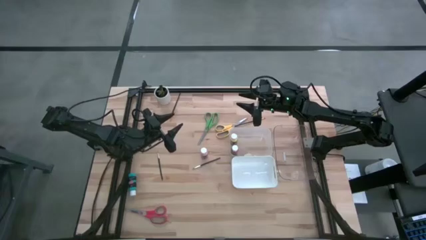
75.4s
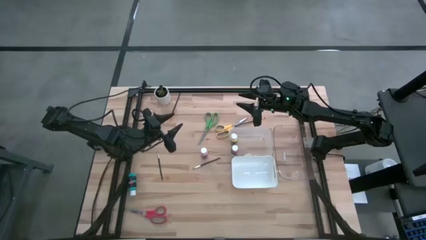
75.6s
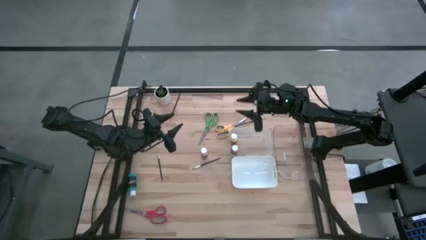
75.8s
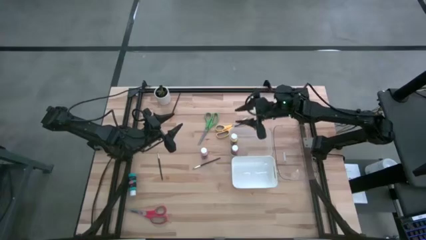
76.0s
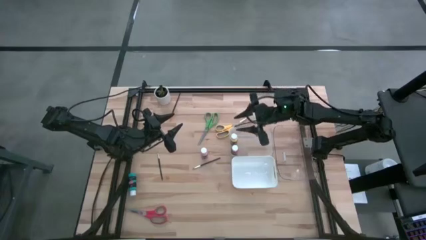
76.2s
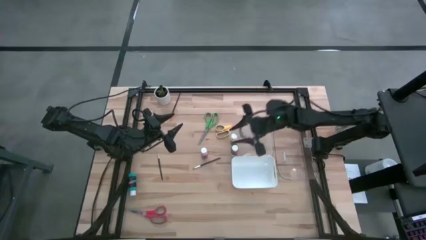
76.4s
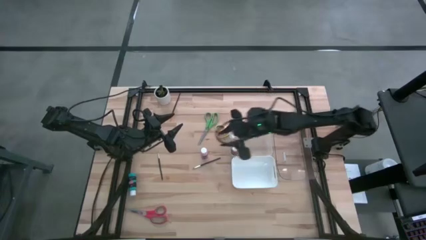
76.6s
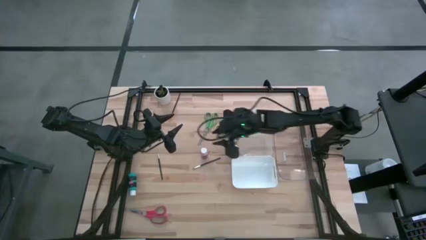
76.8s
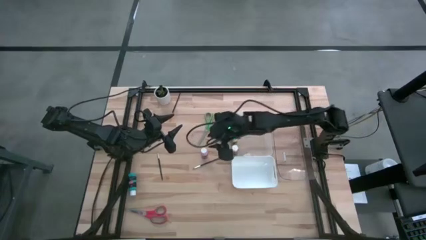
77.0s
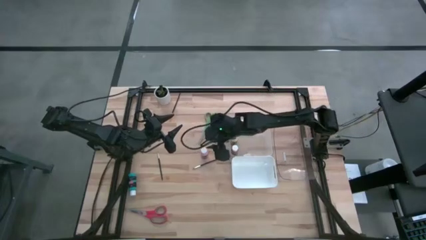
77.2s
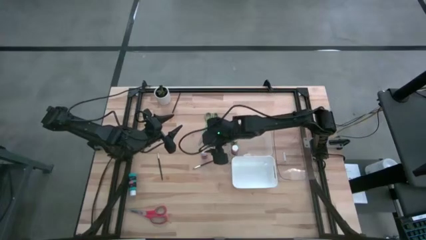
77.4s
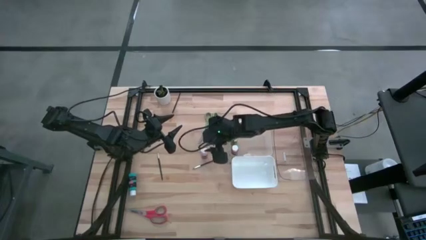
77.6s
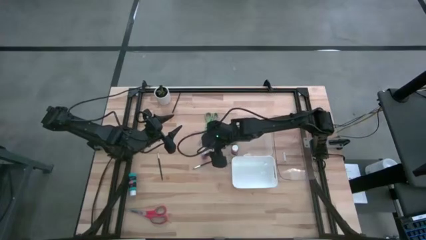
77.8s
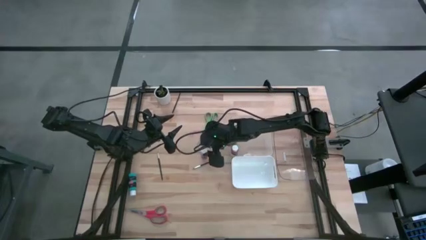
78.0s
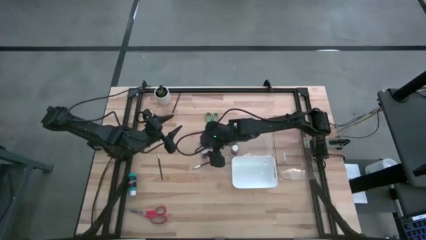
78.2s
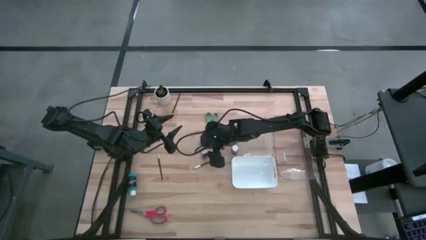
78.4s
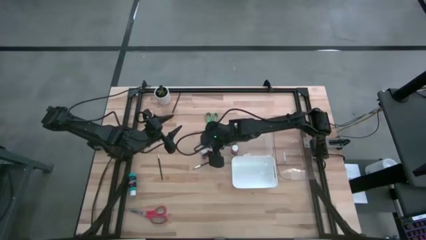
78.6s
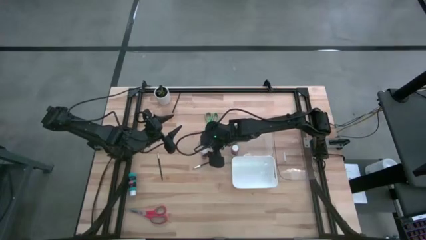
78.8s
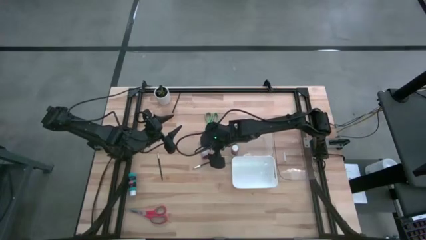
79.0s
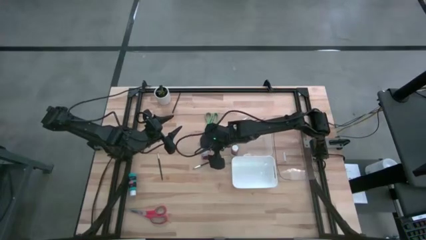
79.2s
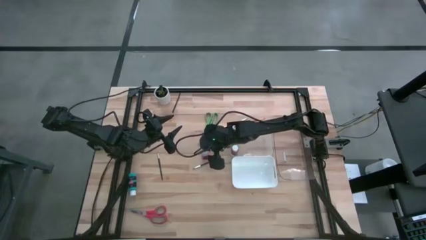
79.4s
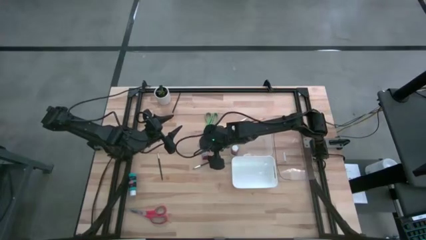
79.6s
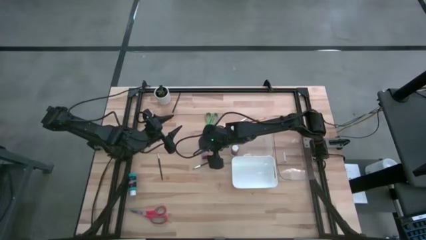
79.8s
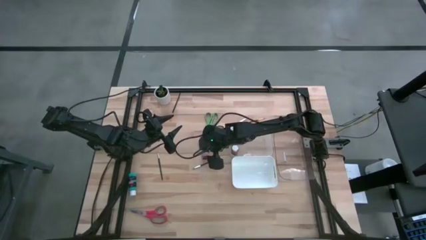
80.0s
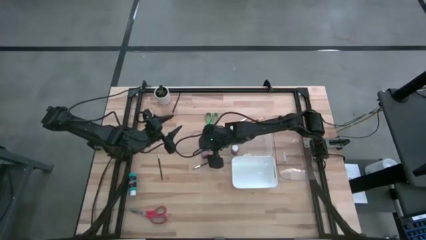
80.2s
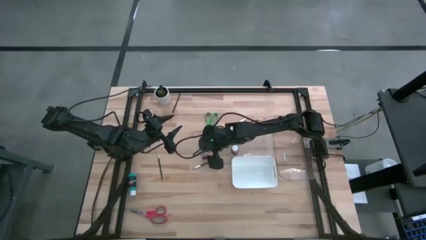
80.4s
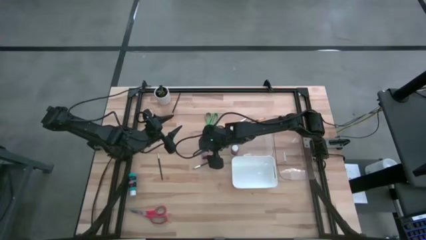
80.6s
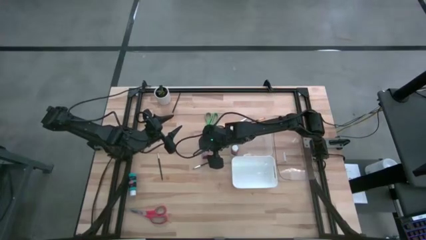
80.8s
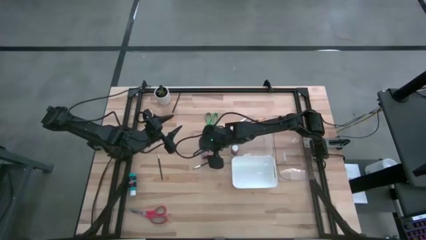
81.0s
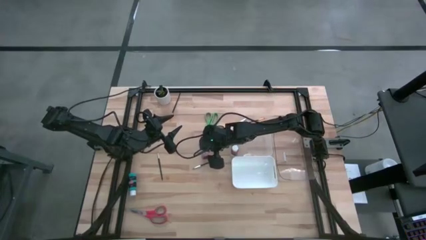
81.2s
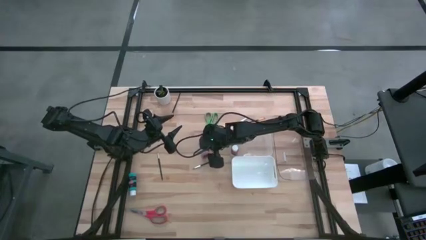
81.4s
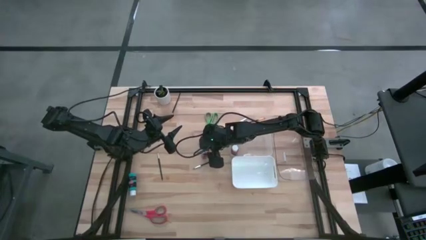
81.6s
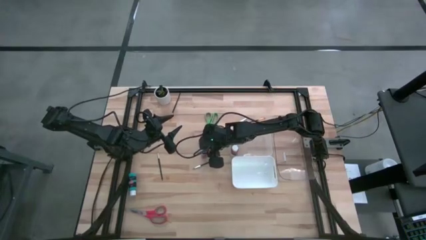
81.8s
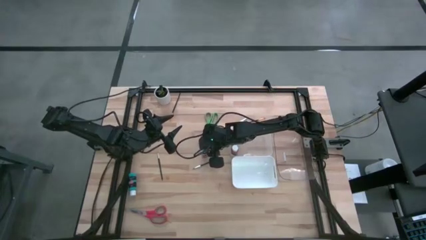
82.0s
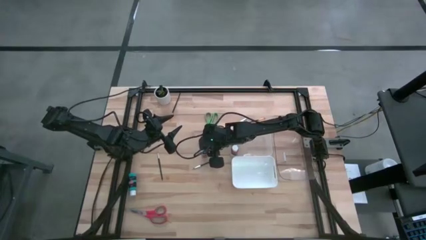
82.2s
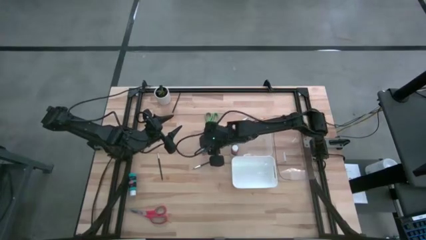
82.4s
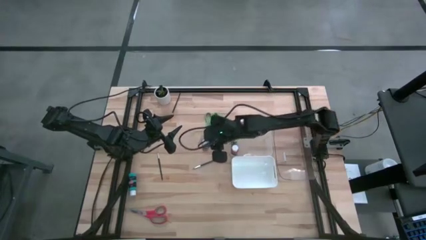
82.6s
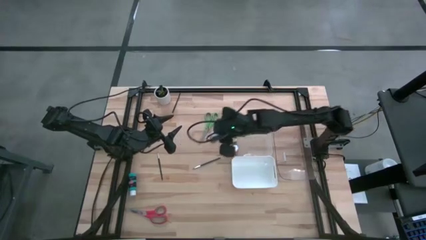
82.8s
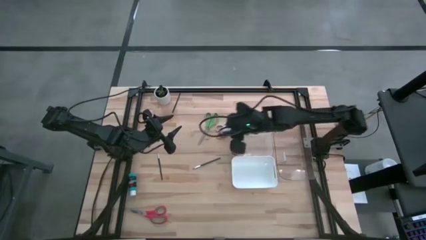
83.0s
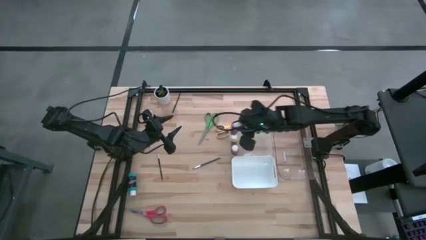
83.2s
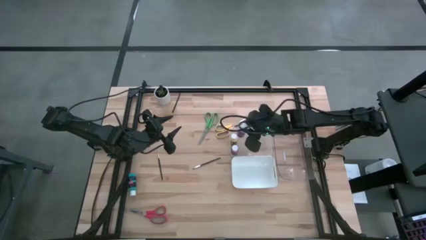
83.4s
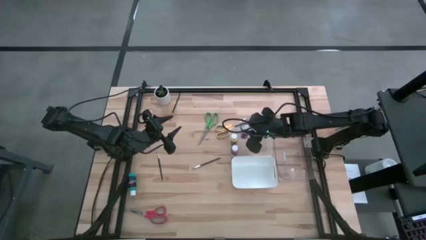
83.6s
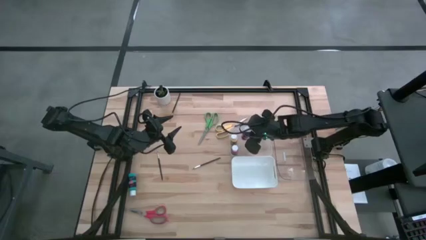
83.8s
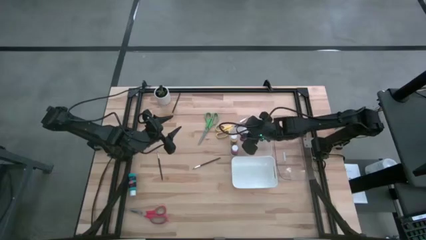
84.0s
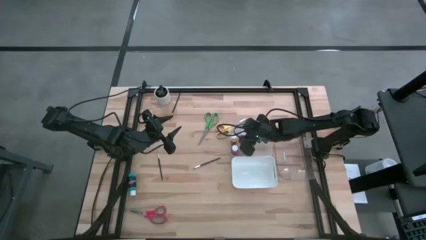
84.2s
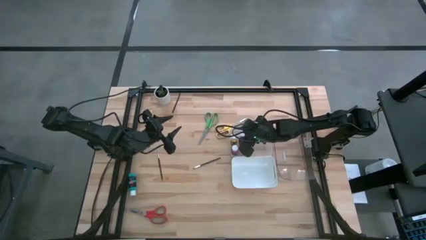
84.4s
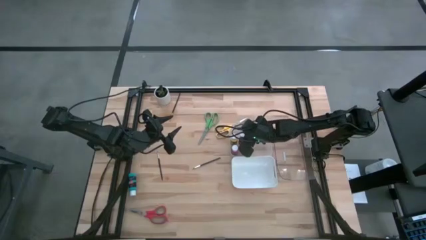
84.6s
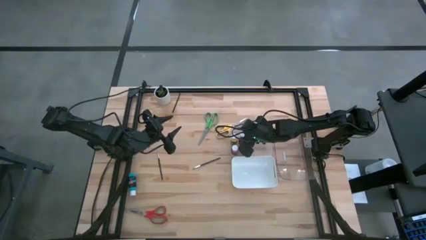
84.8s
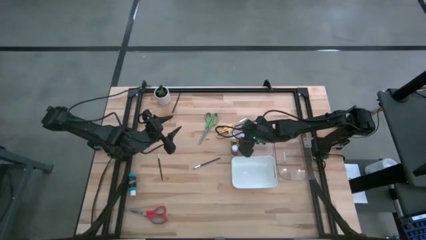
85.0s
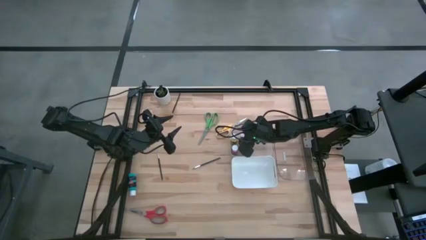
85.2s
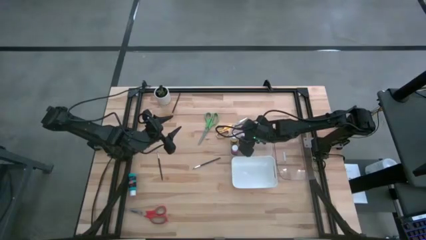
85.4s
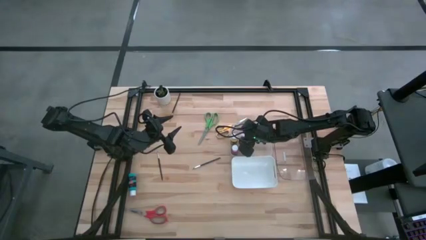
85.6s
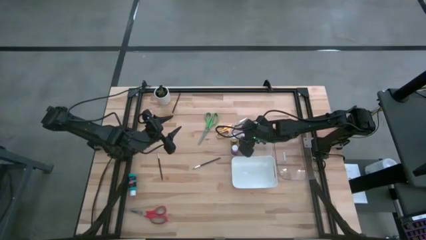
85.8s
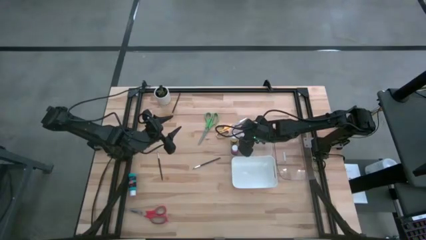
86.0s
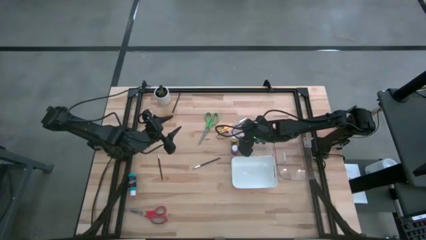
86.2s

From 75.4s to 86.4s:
Task: Pick & Place Paint Supplies
Put the pink paint bottle into the left transparent bin

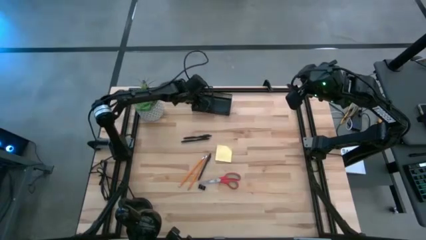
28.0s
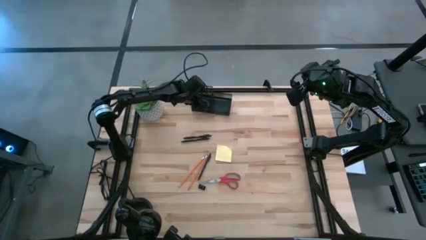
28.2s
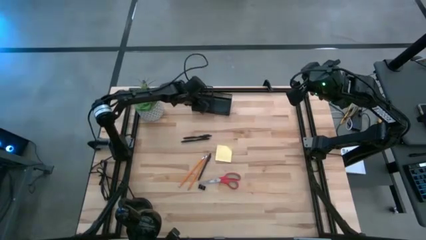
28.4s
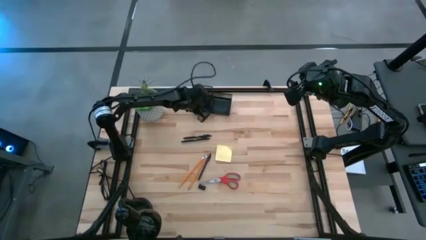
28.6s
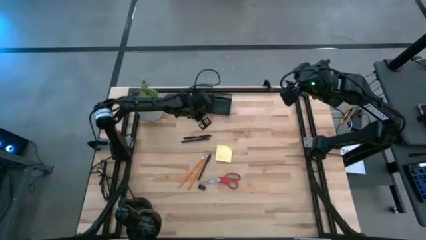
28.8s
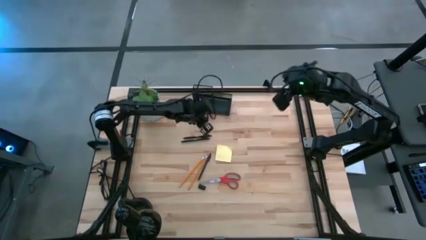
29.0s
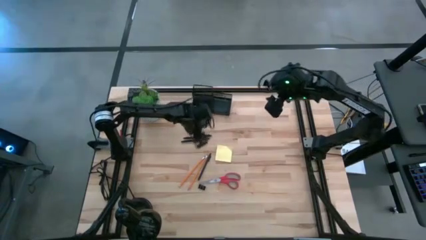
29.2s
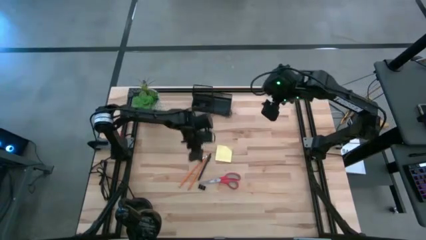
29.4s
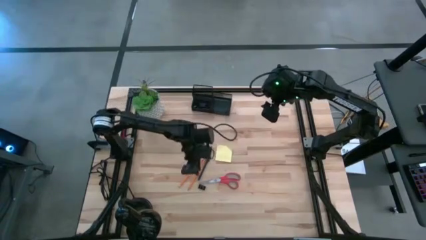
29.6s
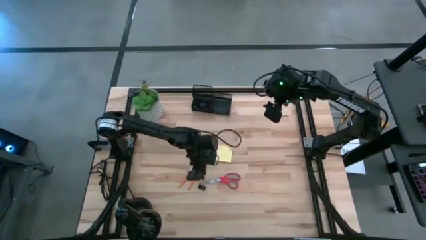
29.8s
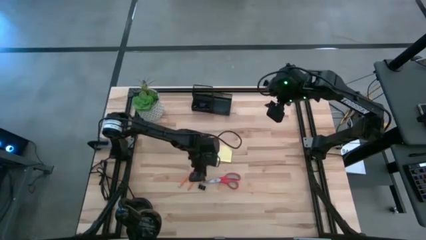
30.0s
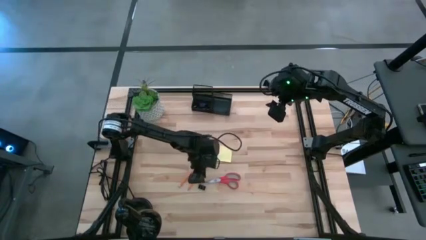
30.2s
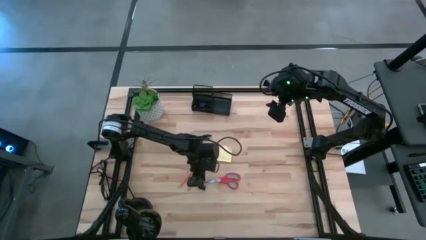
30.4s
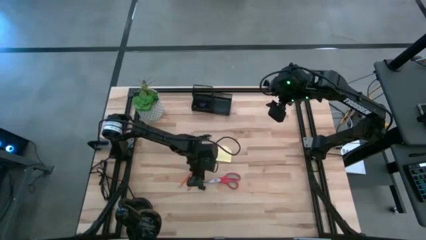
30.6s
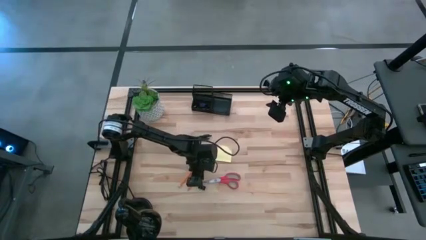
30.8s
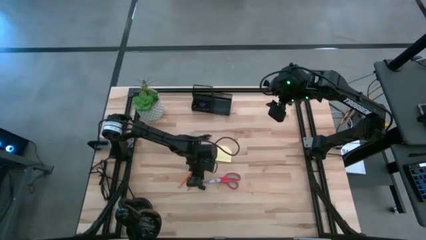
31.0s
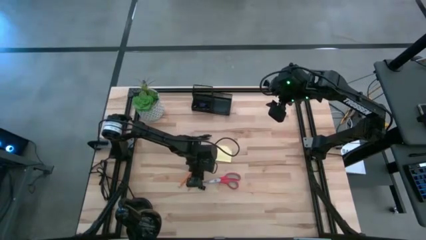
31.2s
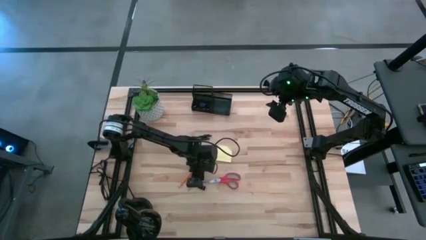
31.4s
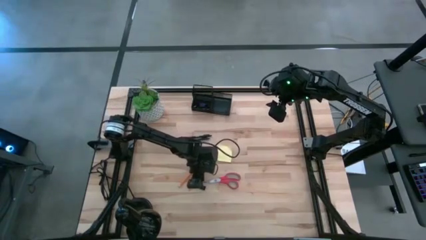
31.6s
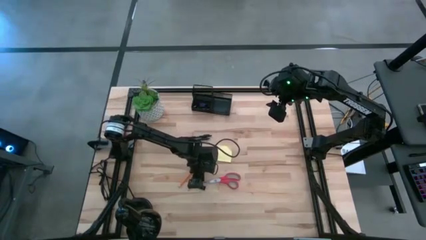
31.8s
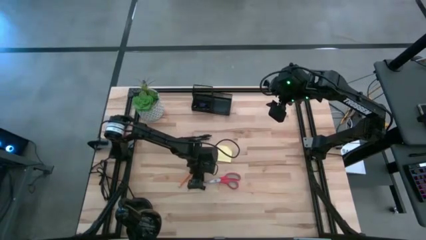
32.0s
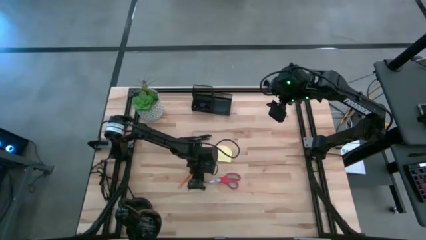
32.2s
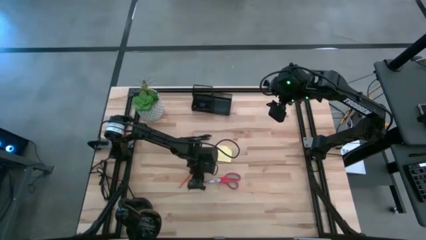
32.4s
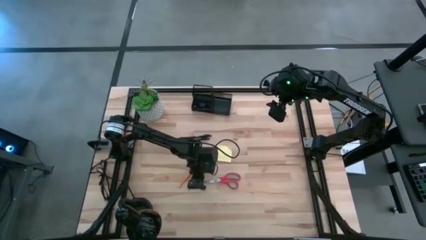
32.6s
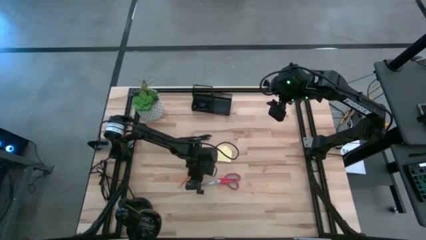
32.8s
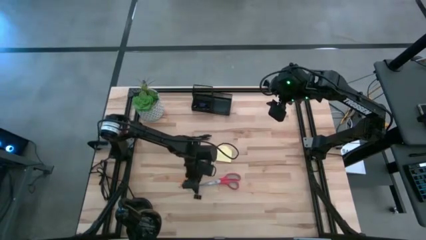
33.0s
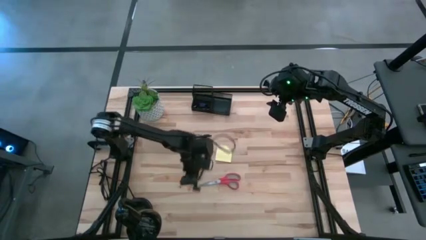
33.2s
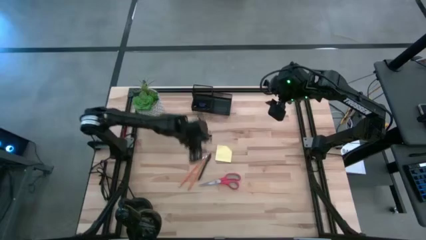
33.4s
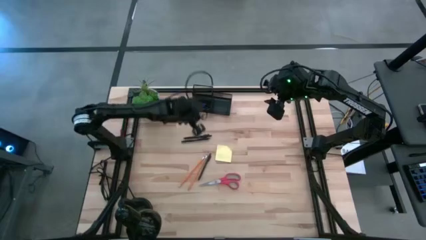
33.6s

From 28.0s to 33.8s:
Task: Pick and place office supplies into organizer
Put the binder clip into the bottom left section of the black desk organizer
